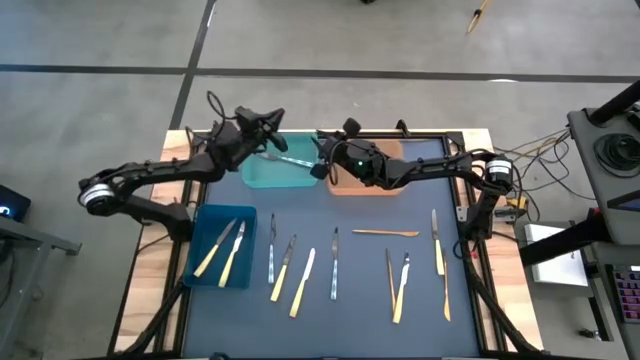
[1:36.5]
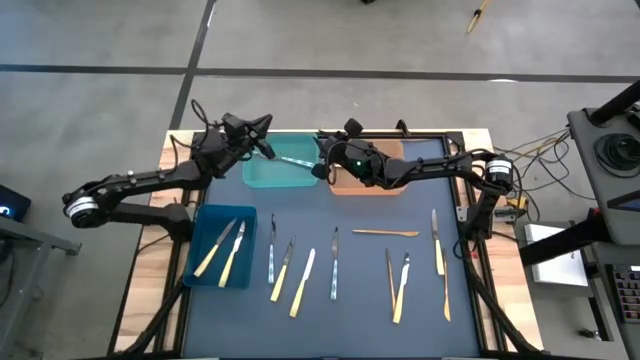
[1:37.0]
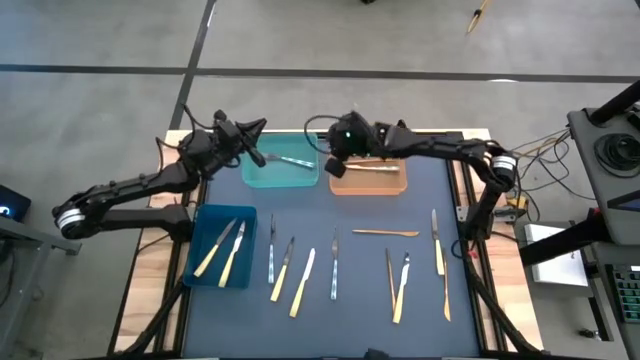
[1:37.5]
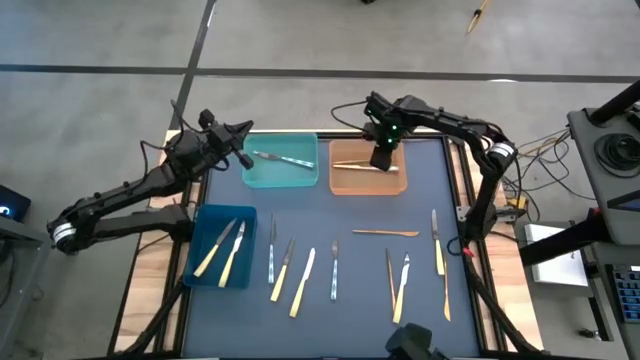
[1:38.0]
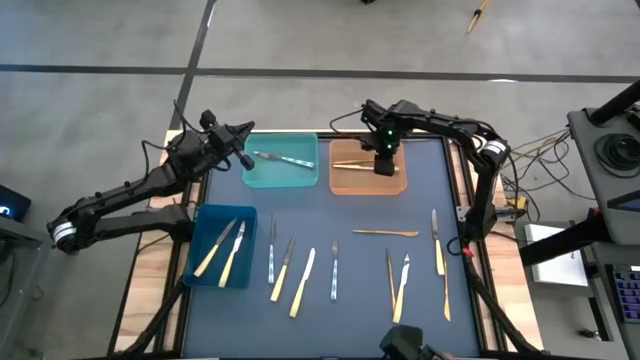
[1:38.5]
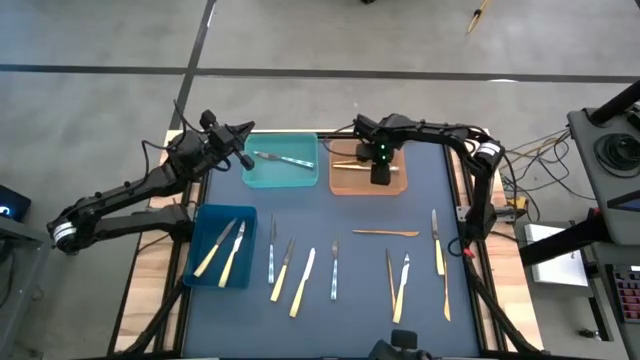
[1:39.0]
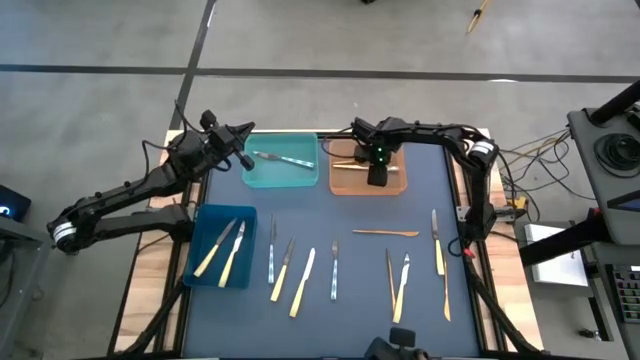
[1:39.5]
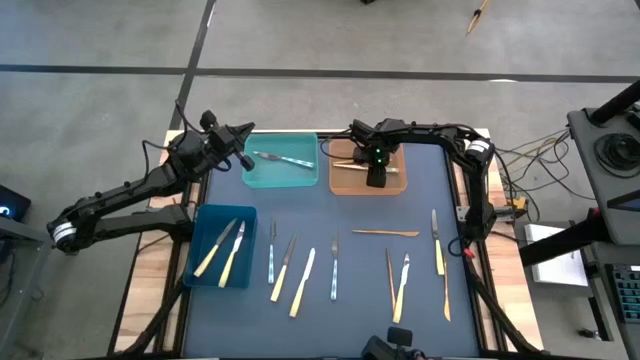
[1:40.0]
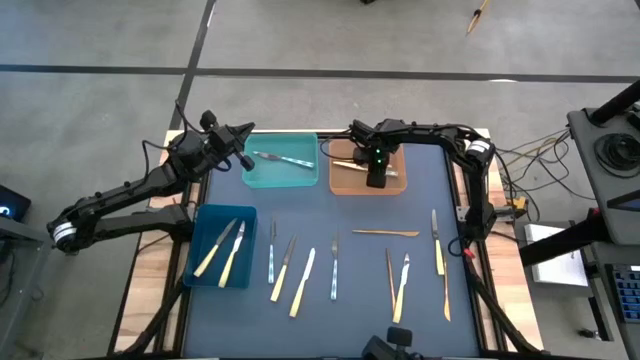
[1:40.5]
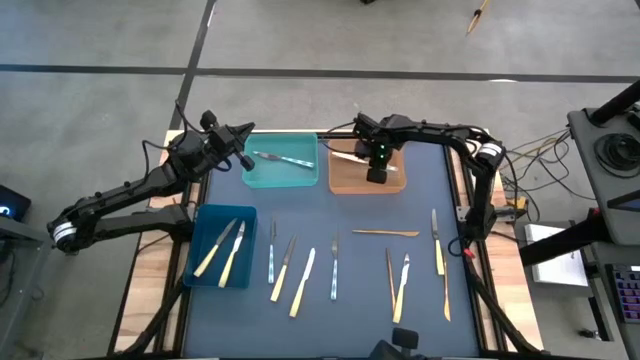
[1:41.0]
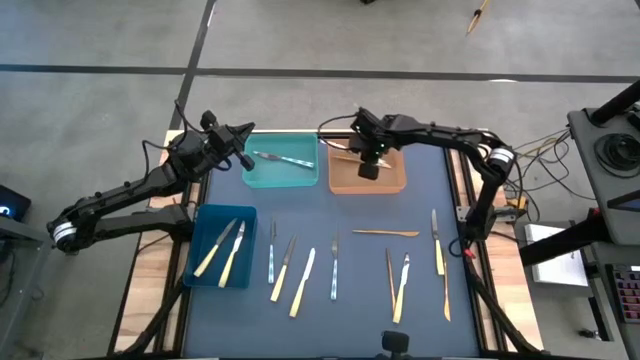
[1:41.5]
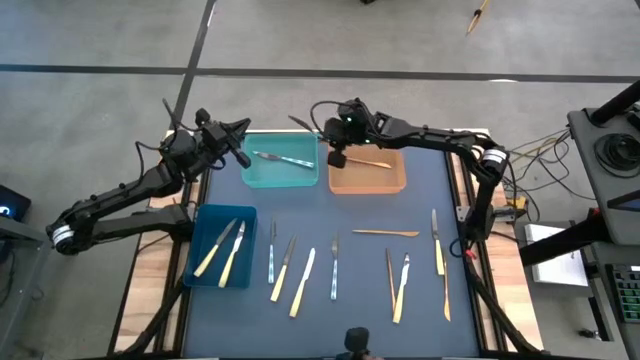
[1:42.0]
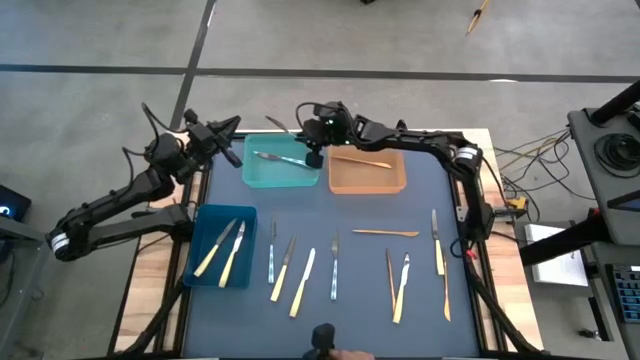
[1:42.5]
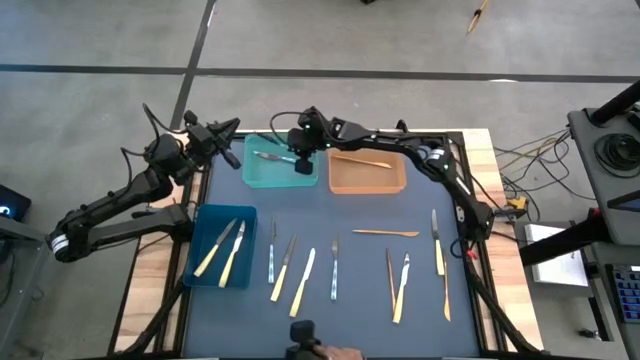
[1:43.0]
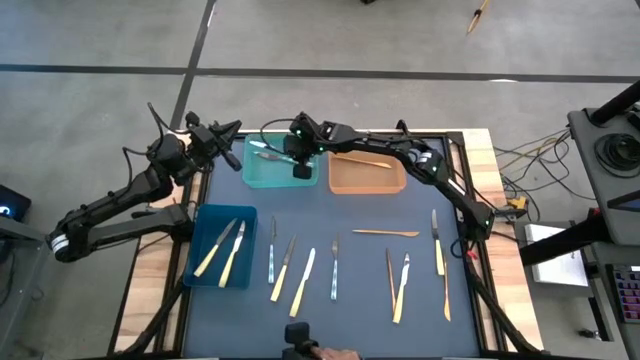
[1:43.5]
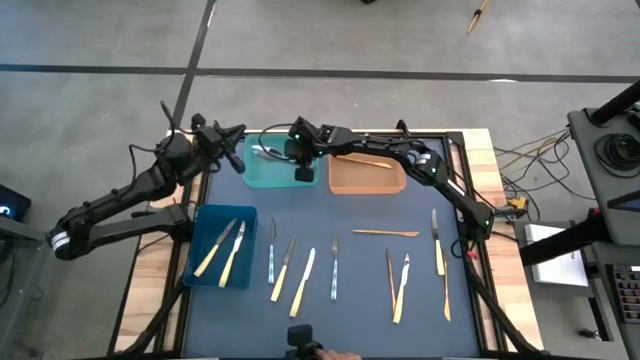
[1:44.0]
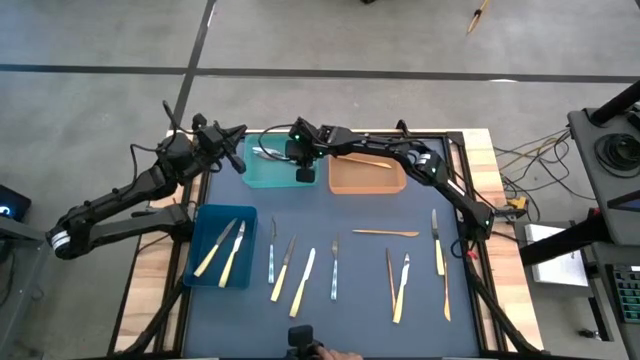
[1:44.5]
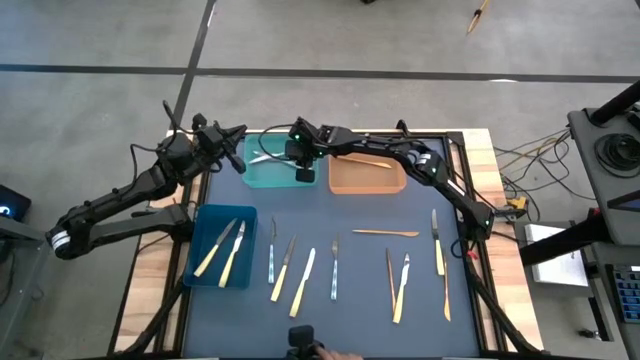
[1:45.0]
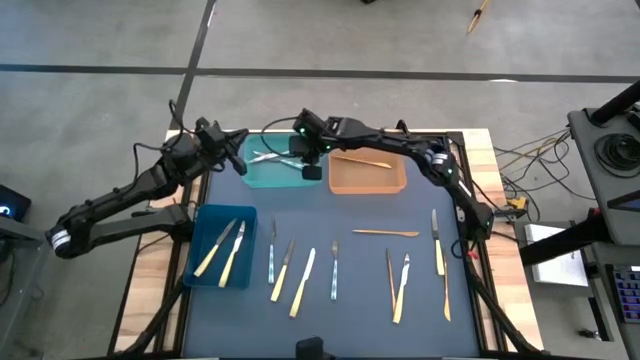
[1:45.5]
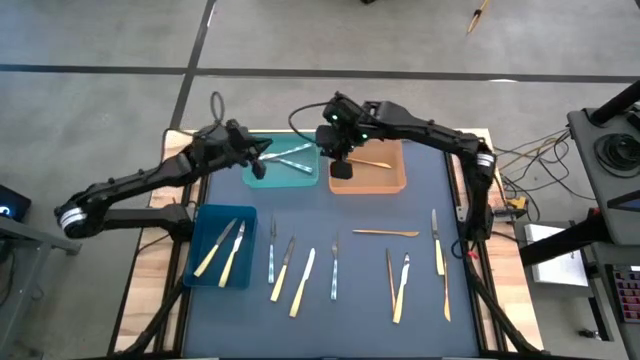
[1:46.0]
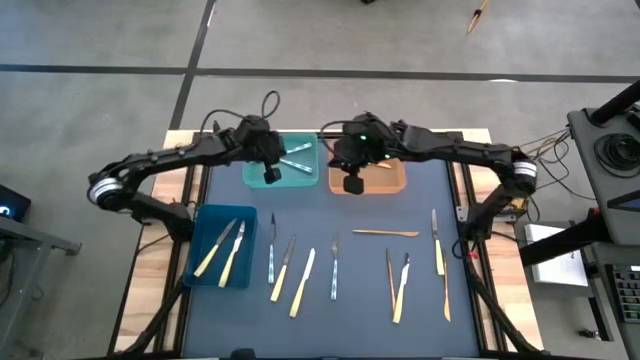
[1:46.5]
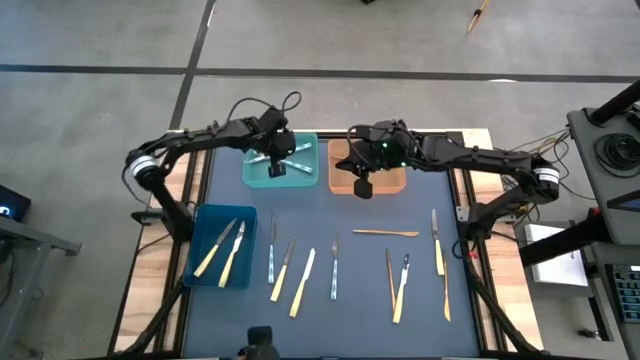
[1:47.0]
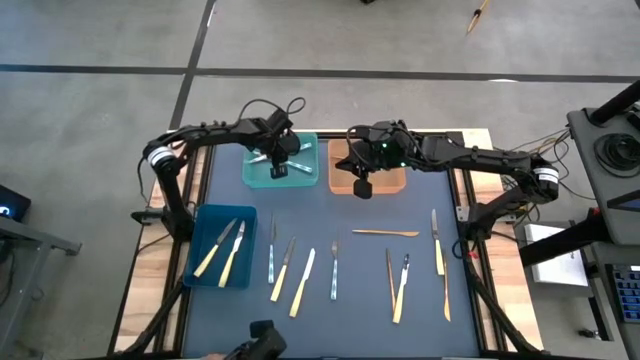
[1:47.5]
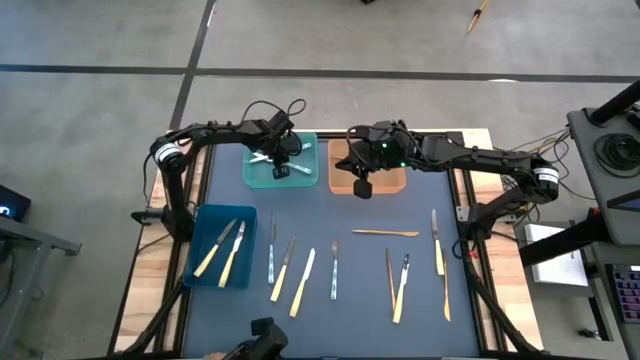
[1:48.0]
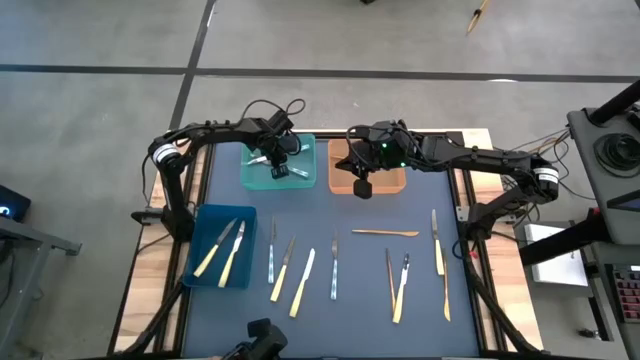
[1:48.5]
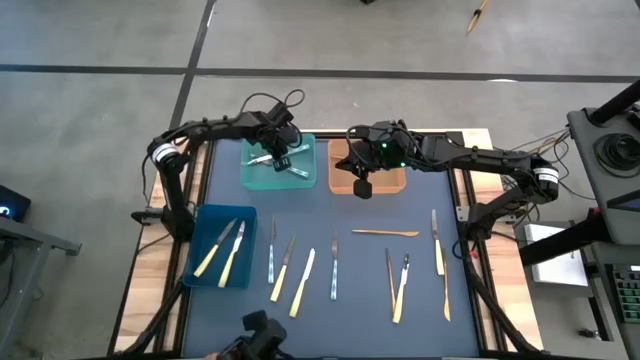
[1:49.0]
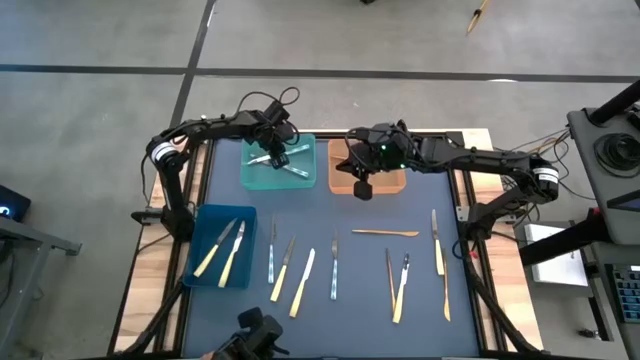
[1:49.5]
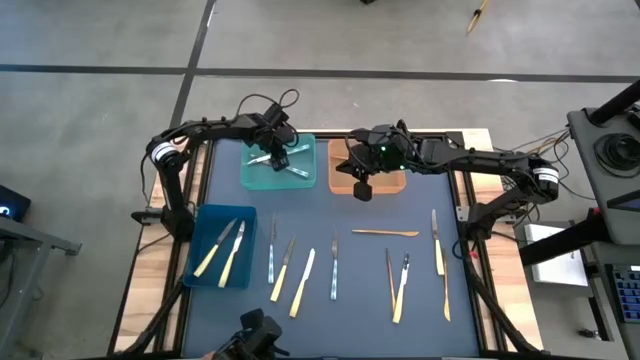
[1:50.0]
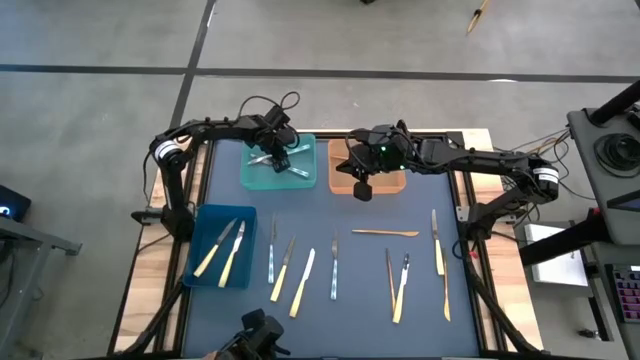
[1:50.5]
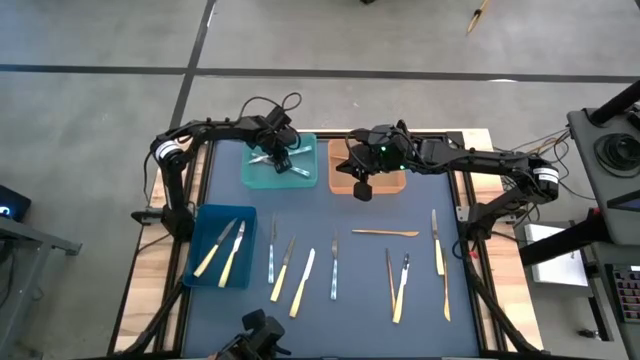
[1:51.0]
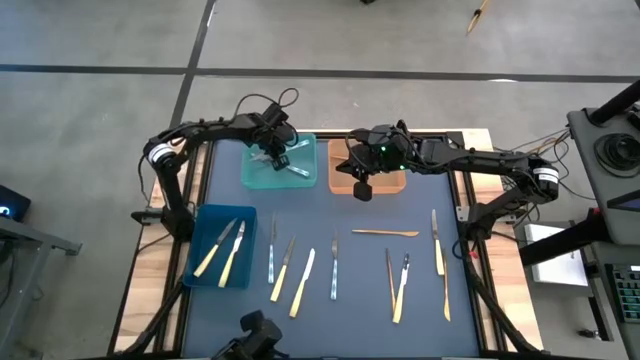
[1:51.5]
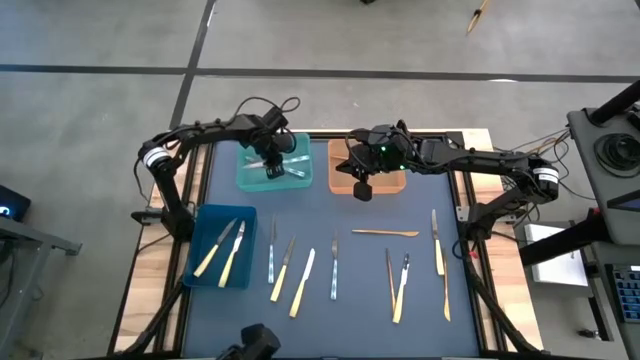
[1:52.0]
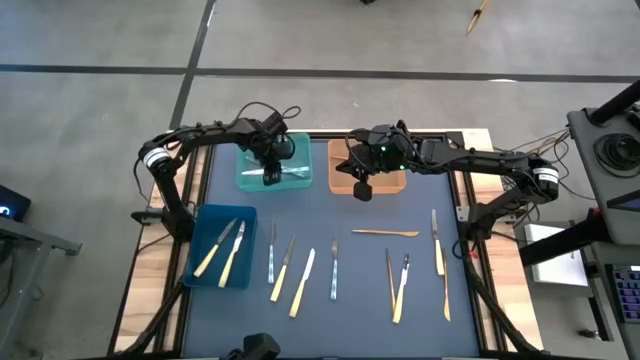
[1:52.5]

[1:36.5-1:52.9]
Task: Sort silverware by color (type)
Put the white knife into the light blue bin

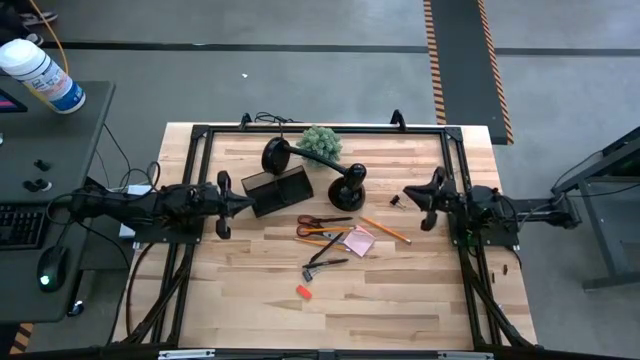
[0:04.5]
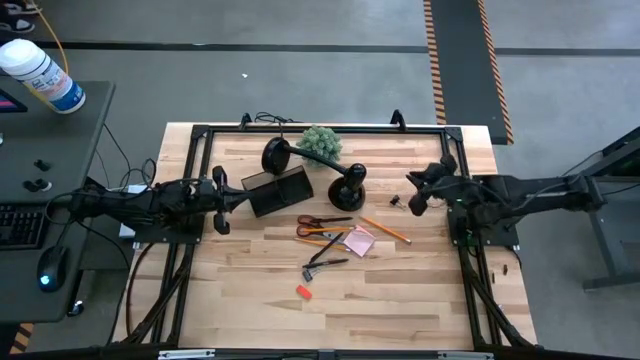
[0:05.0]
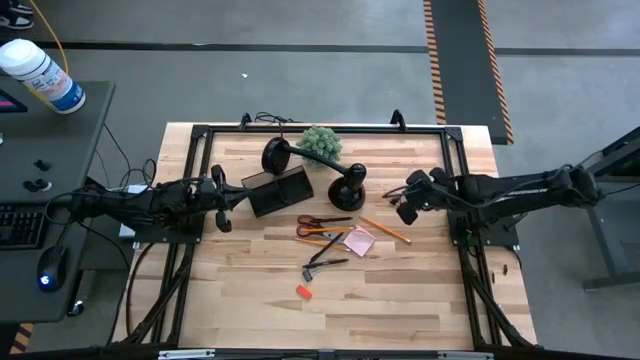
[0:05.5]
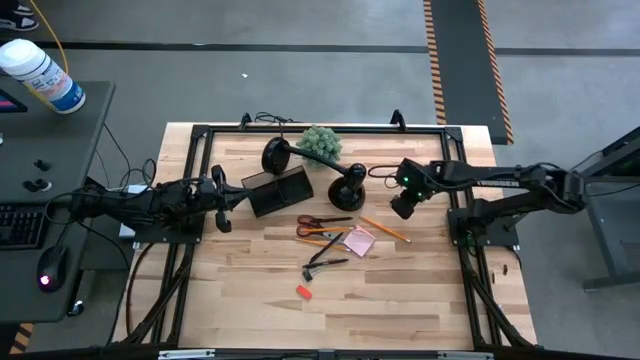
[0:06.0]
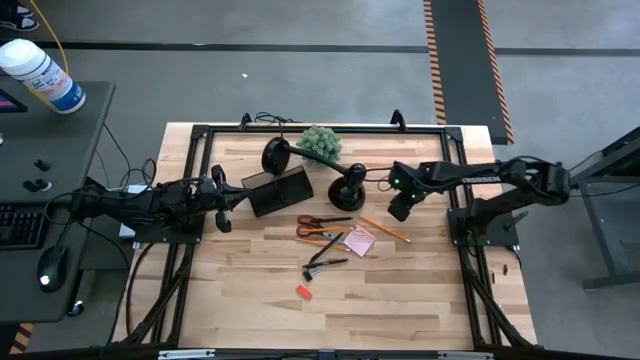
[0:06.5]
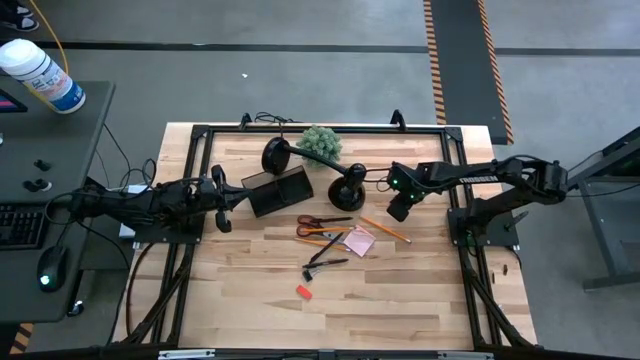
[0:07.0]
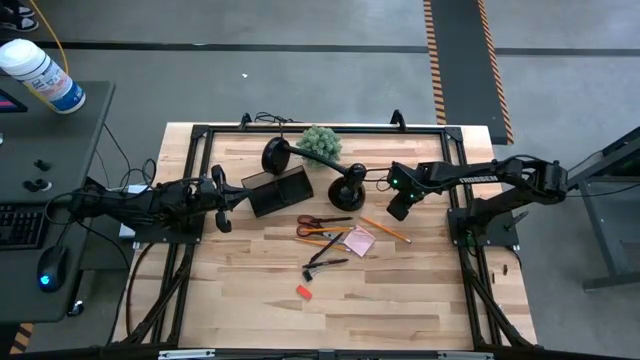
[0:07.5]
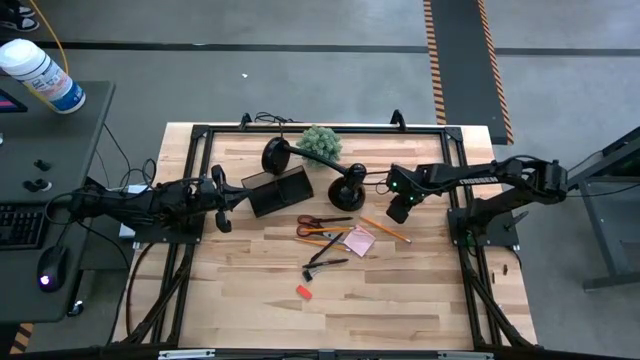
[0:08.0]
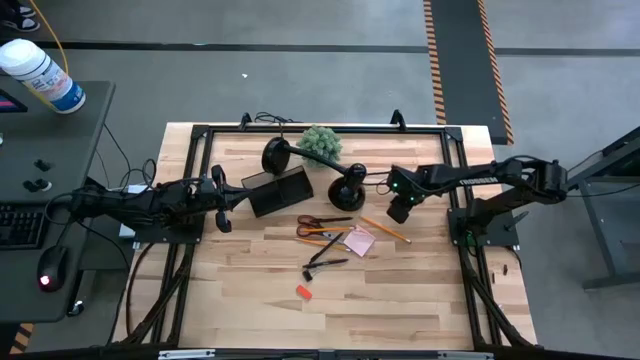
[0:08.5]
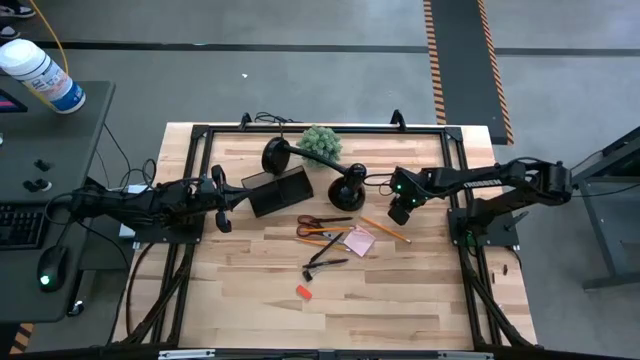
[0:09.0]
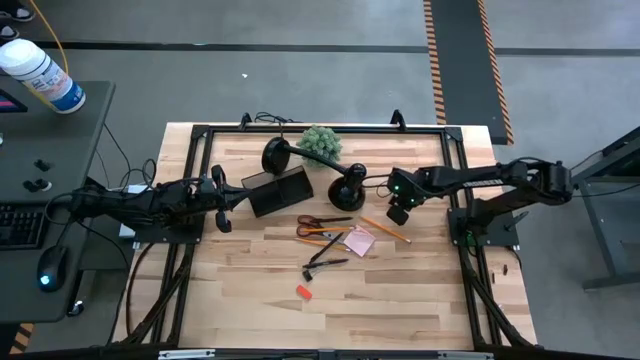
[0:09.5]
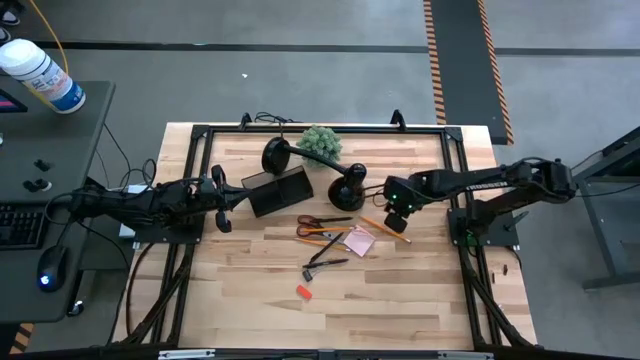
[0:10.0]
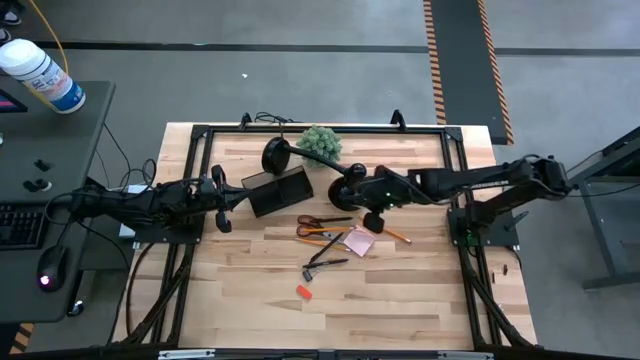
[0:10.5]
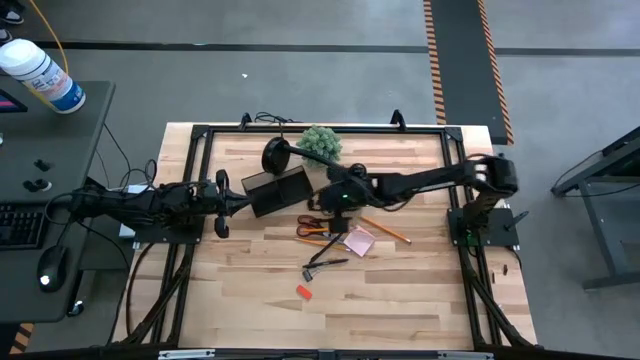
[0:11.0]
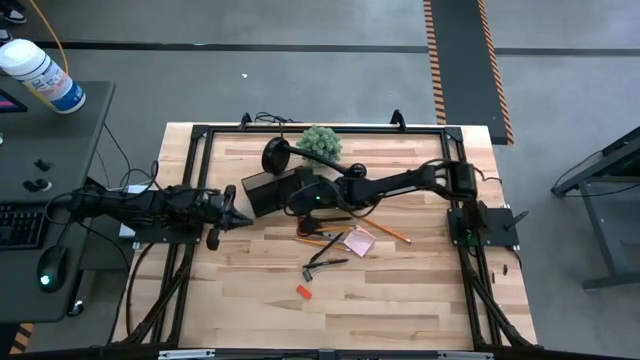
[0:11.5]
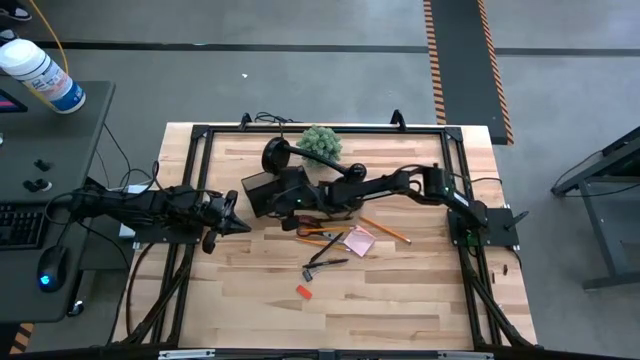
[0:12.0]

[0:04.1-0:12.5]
Task: Pick and place office supplies into organizer
Put the top black binder clip into the black desk organizer
